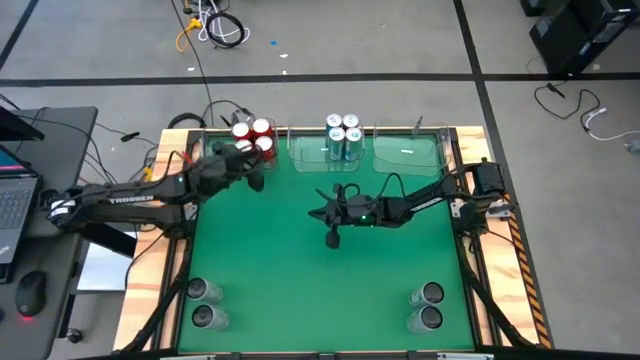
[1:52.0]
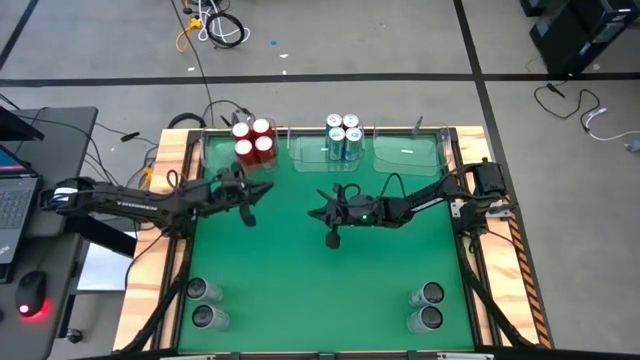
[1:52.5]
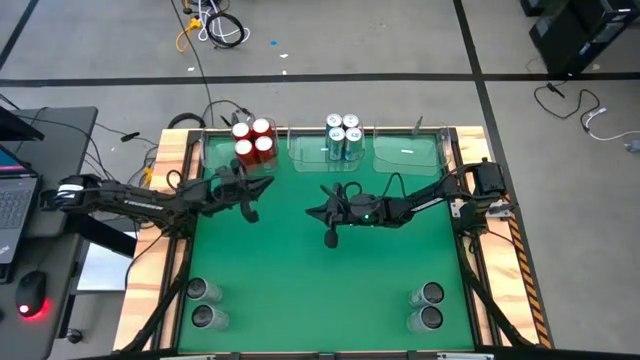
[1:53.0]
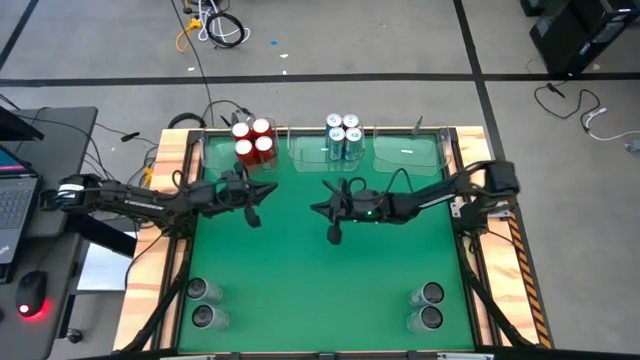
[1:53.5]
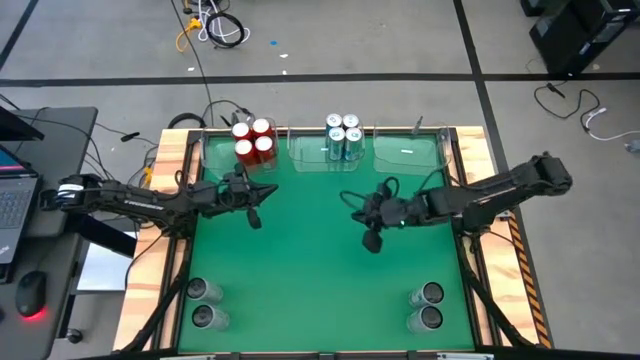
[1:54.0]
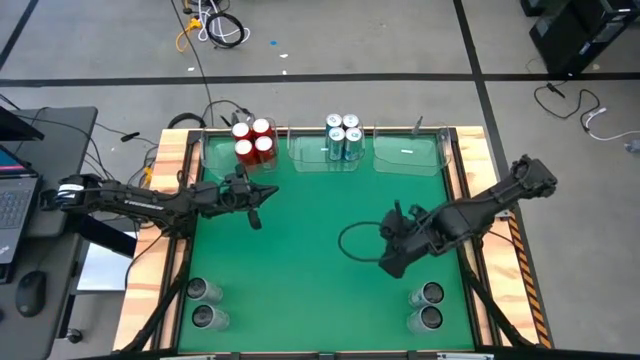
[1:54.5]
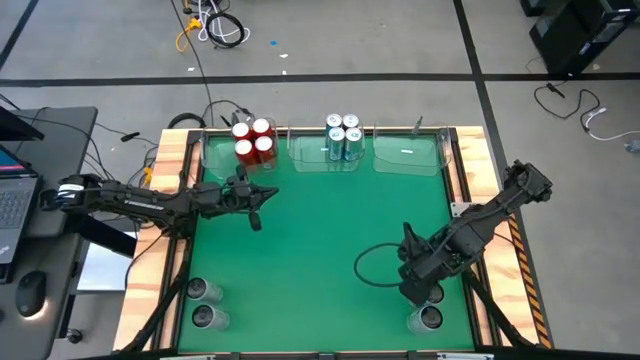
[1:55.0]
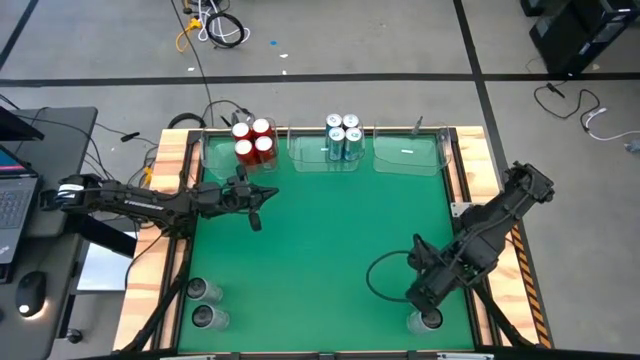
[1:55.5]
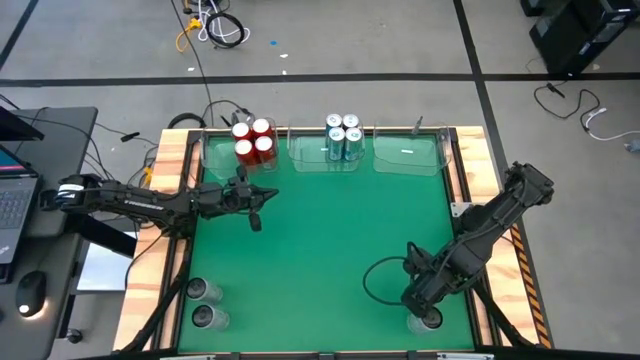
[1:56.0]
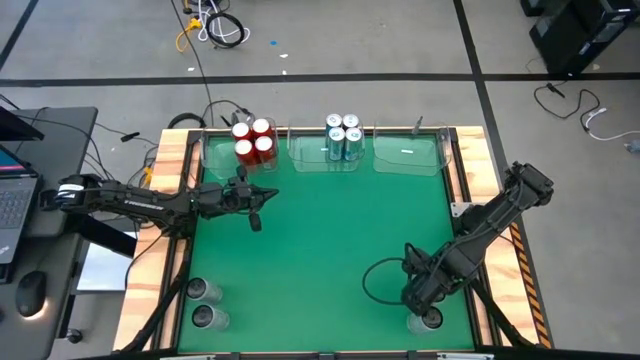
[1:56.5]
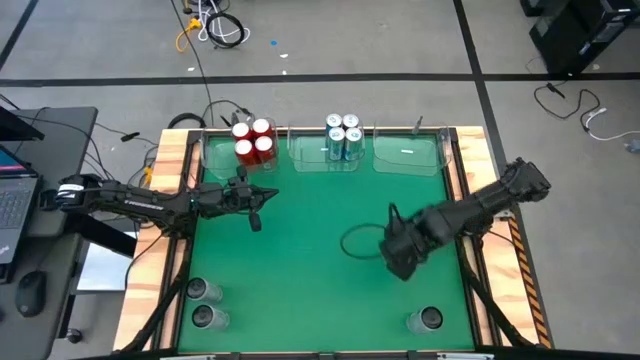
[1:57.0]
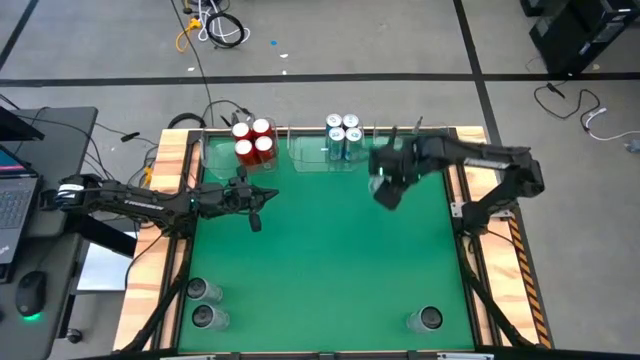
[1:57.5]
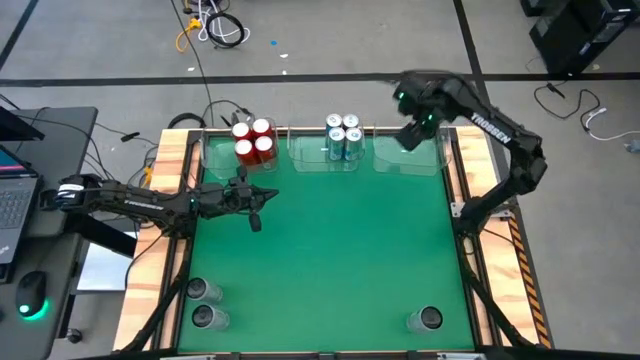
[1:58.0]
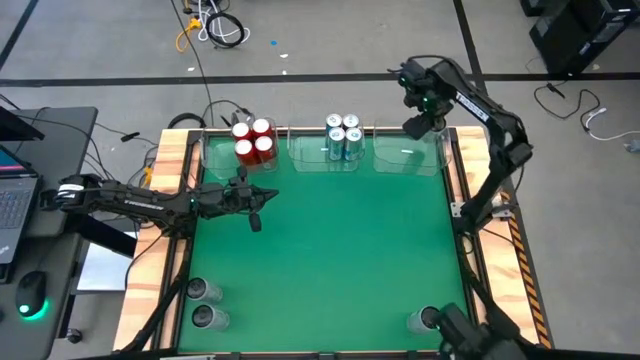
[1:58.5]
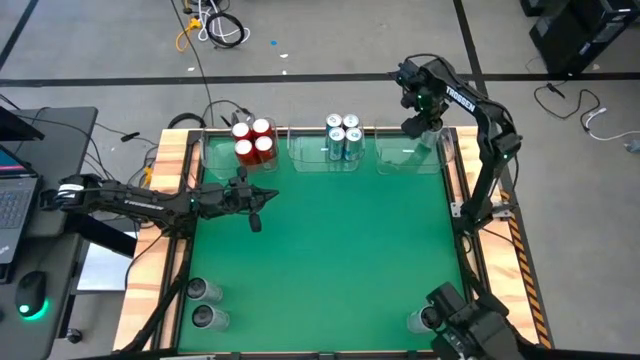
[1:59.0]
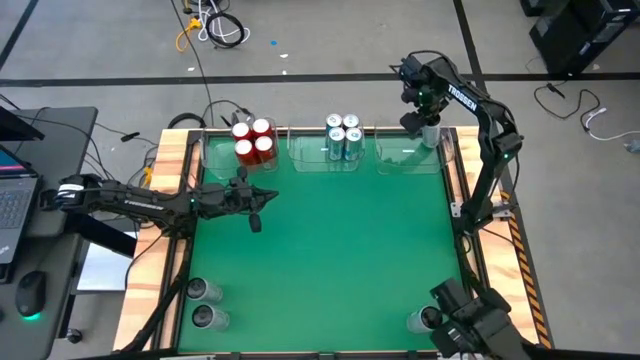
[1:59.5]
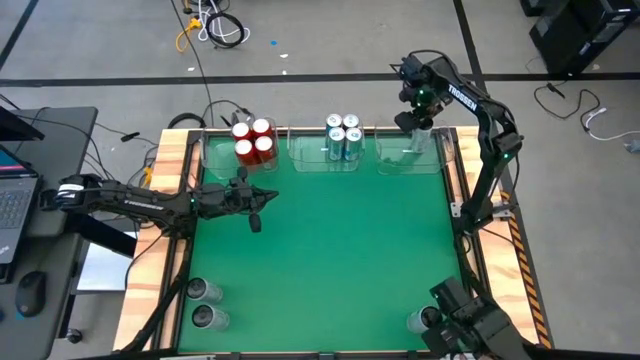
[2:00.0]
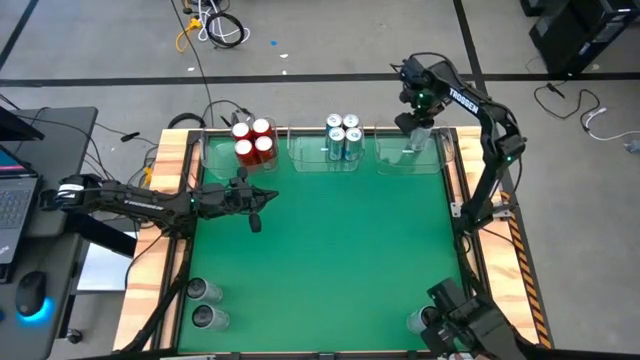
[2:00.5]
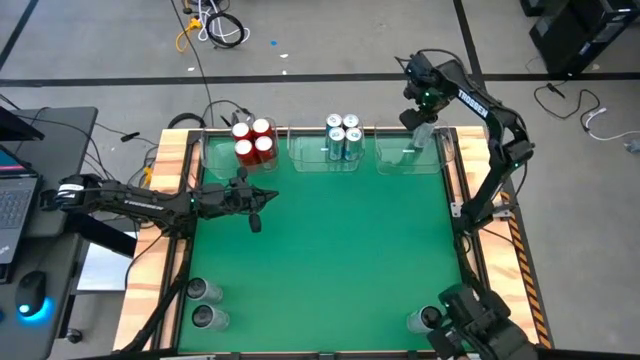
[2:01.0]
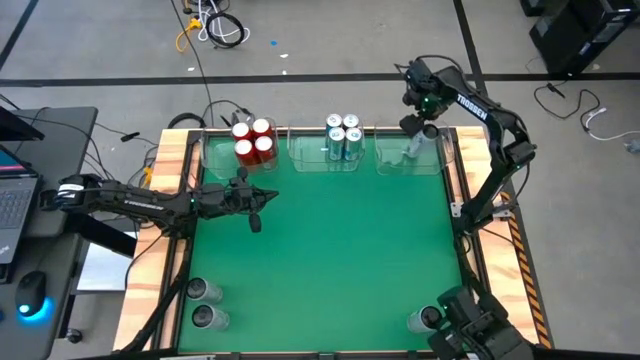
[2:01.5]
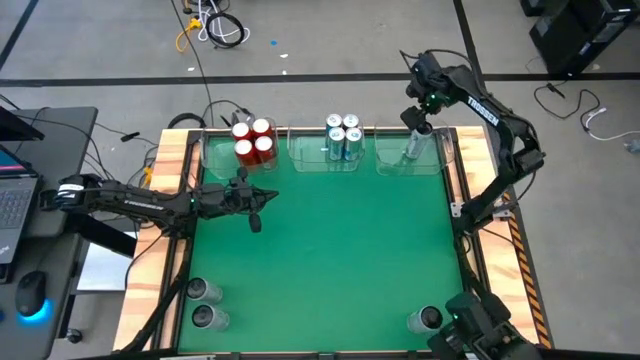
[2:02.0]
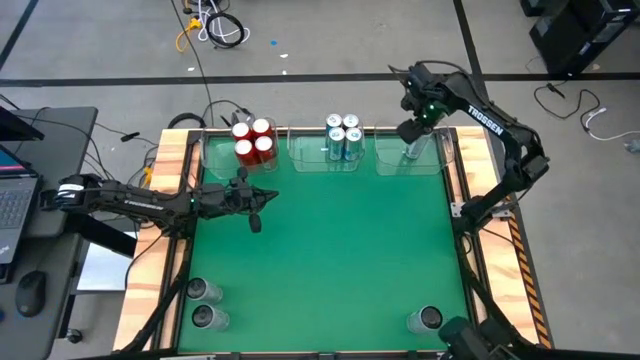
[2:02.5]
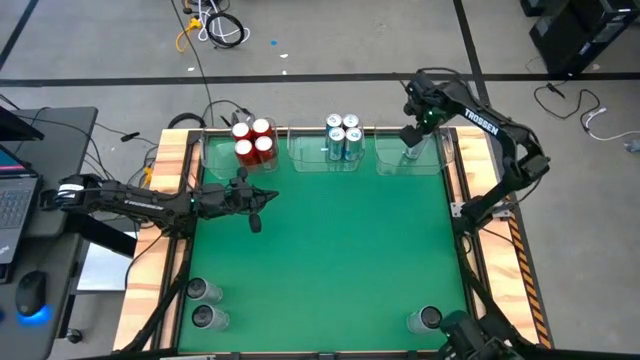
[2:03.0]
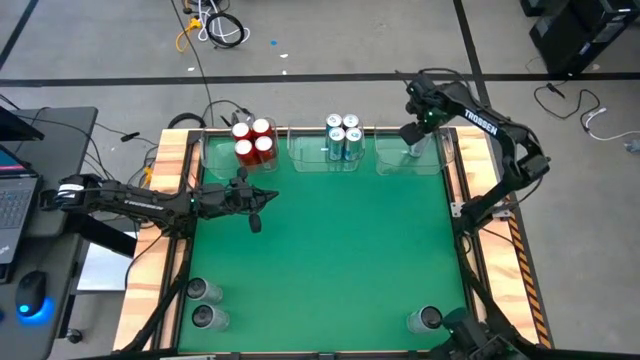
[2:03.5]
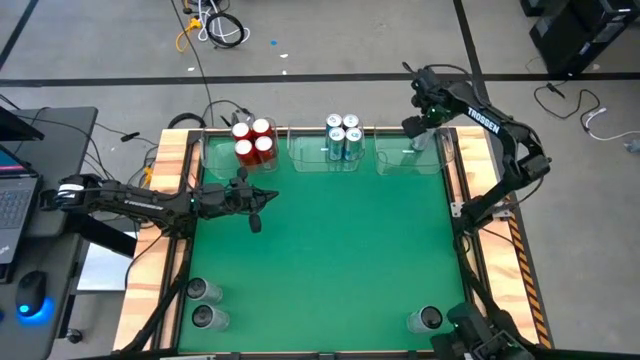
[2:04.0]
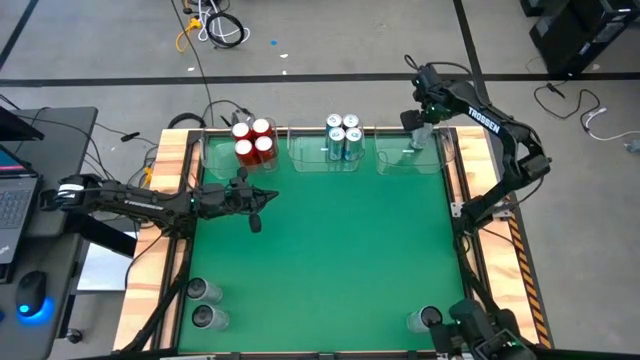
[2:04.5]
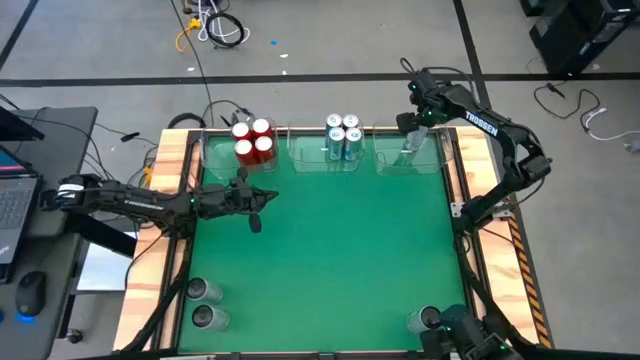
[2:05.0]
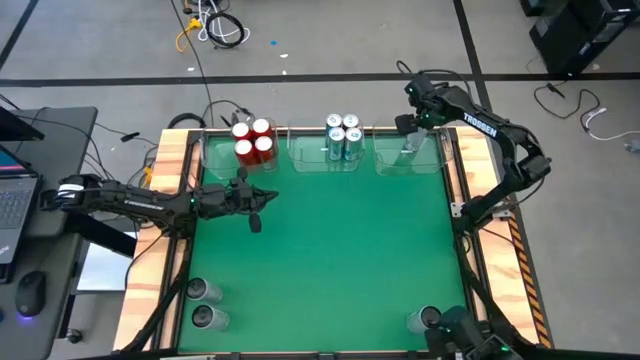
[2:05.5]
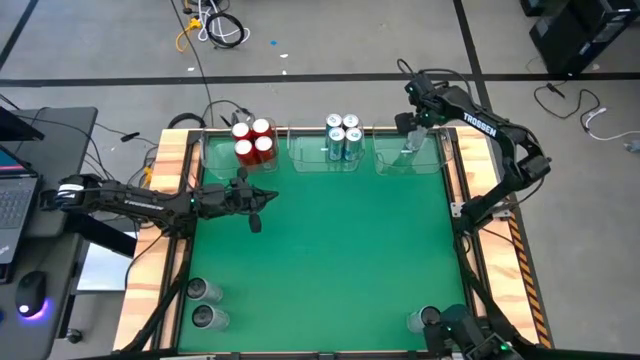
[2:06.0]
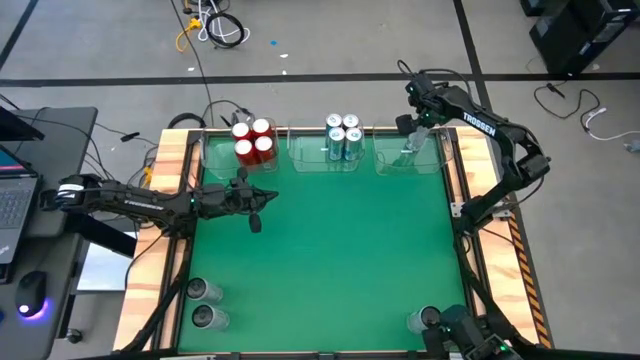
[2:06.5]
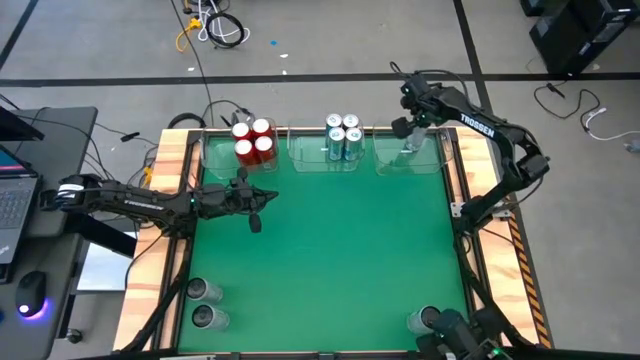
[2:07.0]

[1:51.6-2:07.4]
Task: Sort soda cans
Put the white soda can into the transparent right bin

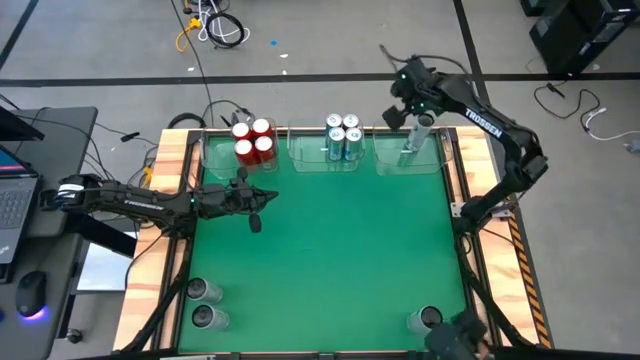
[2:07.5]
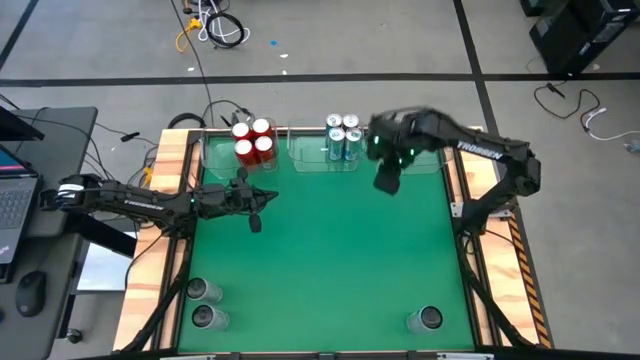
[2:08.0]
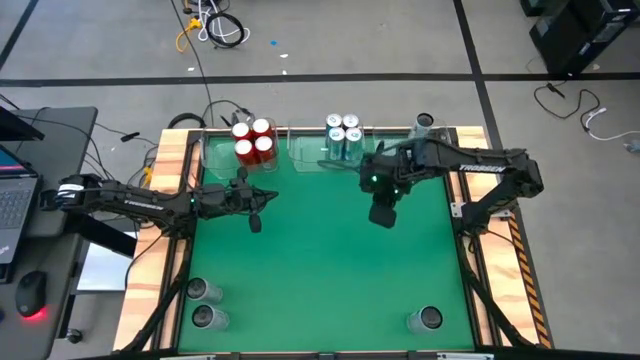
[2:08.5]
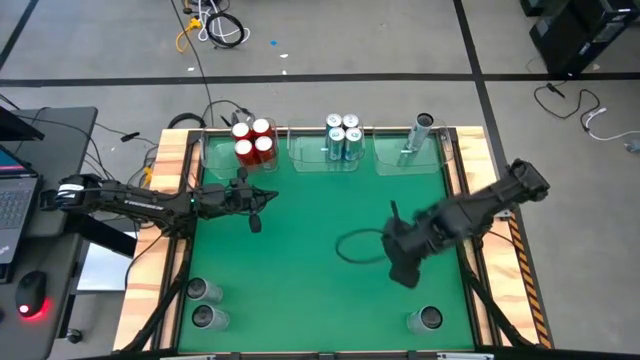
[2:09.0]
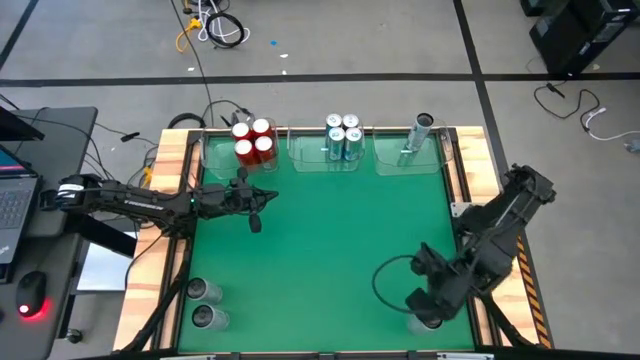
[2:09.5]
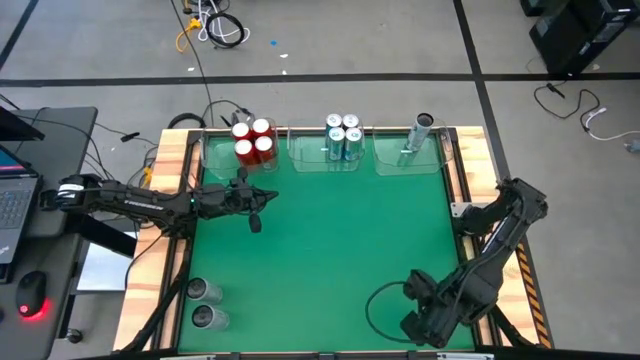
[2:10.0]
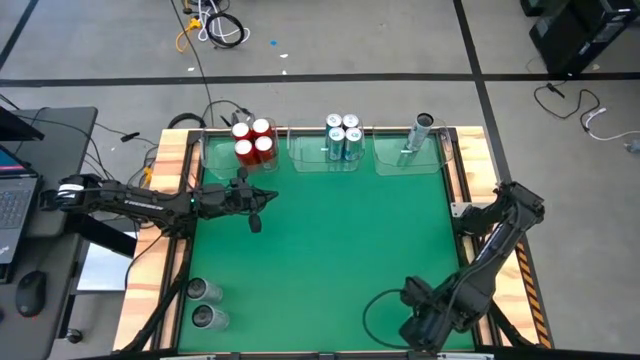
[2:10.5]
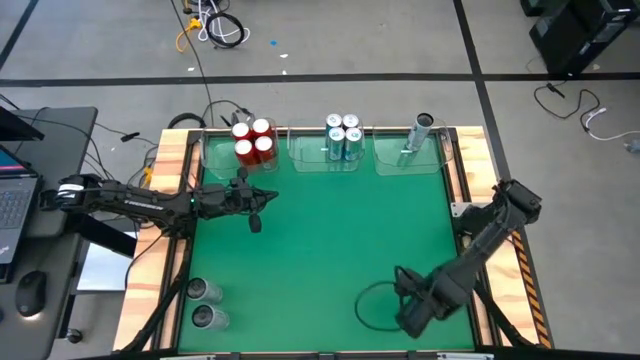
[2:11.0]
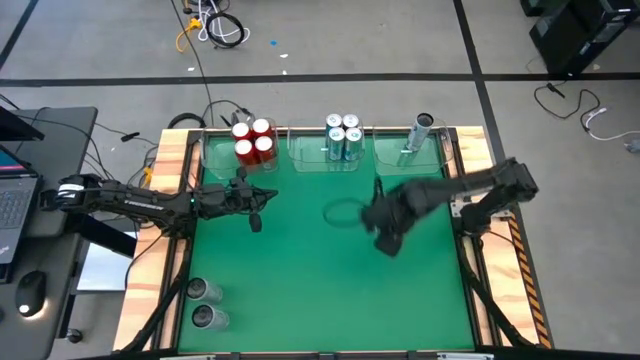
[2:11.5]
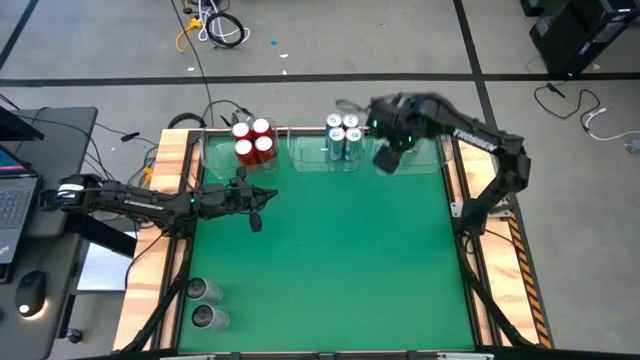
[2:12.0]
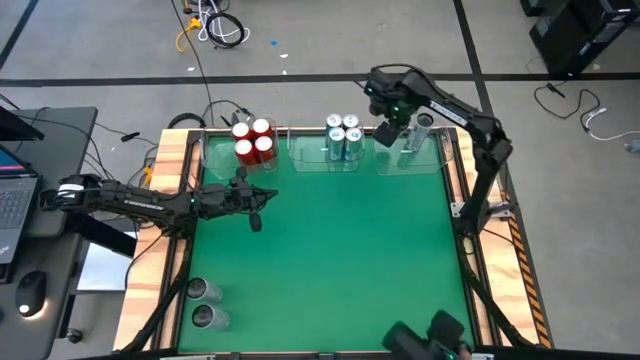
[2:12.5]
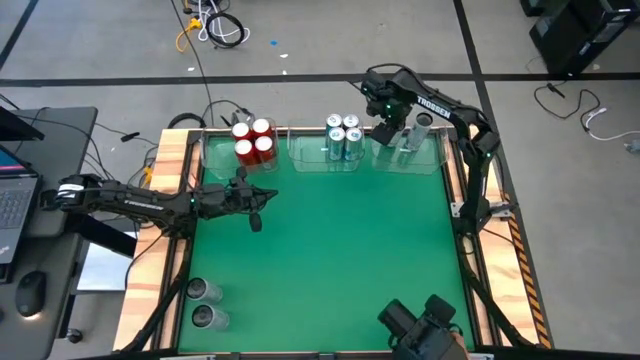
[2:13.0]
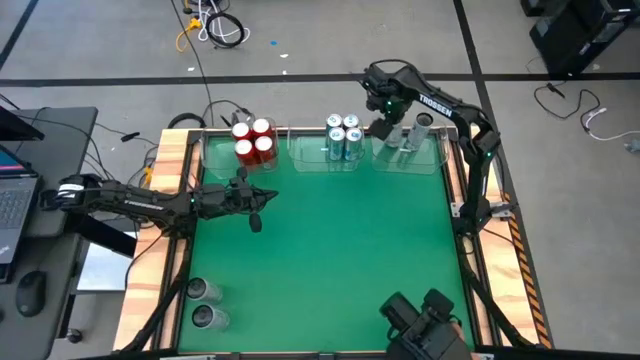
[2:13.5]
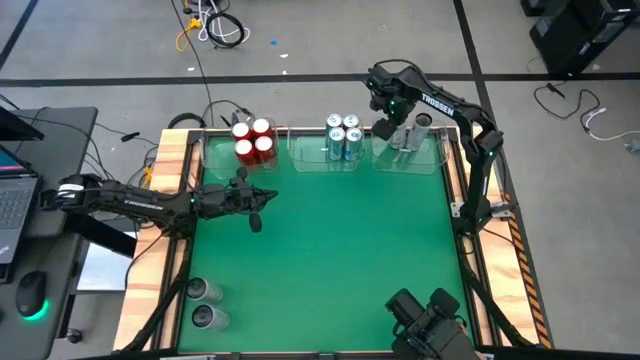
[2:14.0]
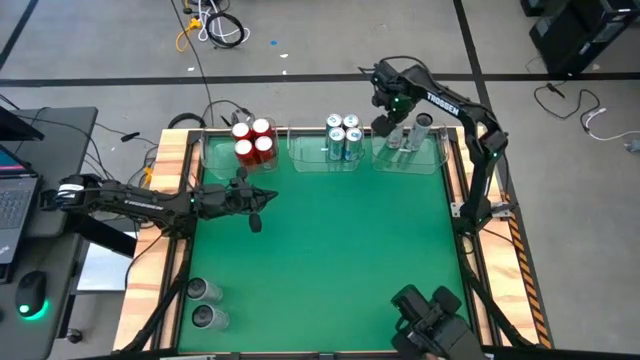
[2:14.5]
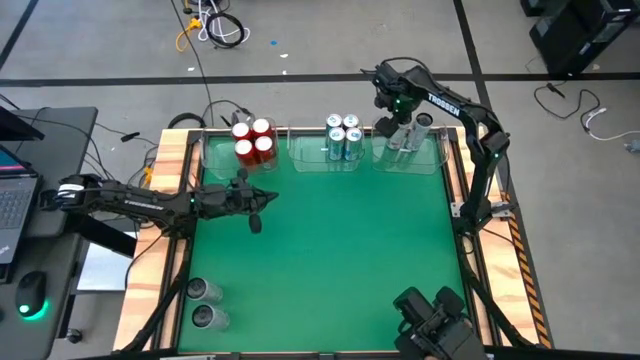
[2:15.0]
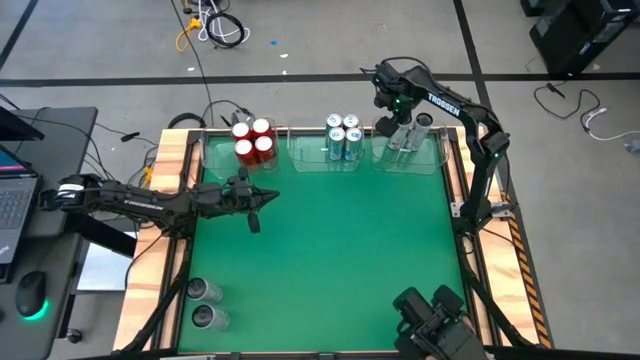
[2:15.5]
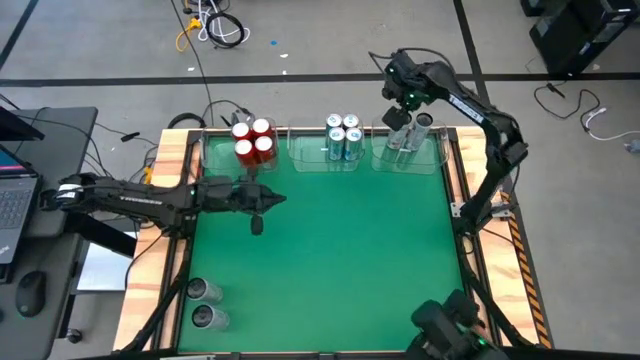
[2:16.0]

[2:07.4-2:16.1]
Put the white soda can into the transparent right bin
